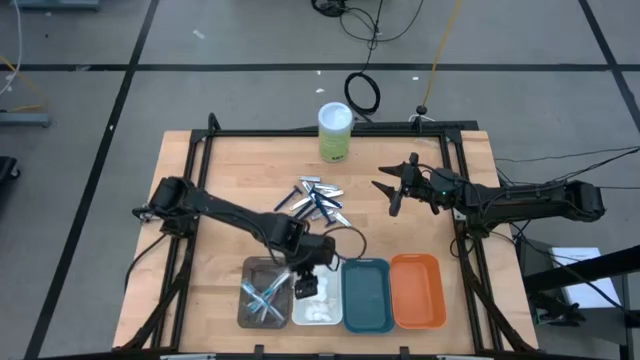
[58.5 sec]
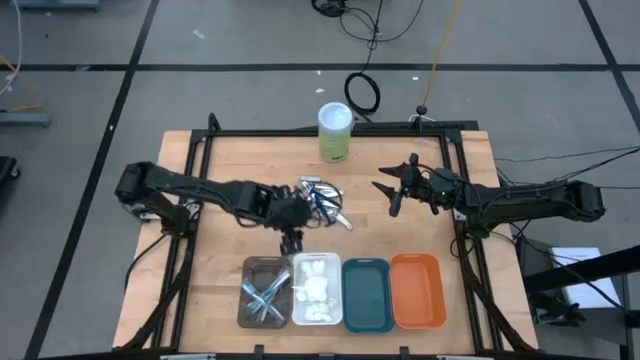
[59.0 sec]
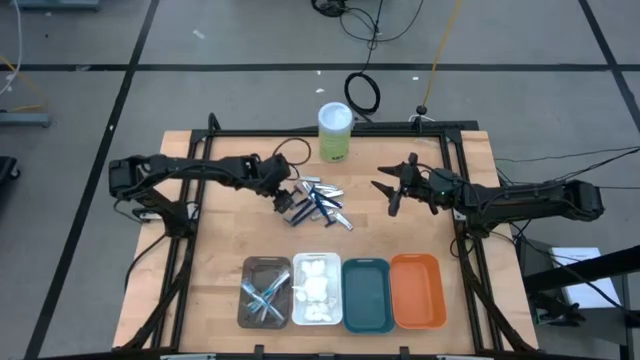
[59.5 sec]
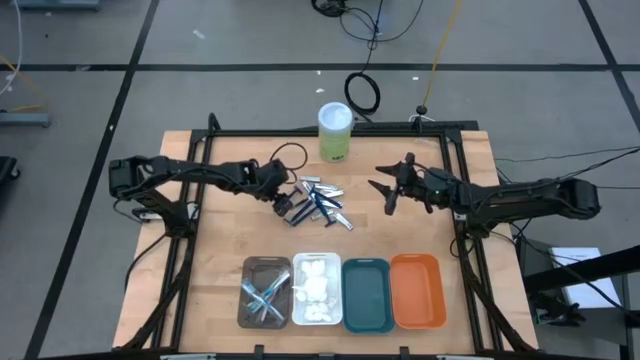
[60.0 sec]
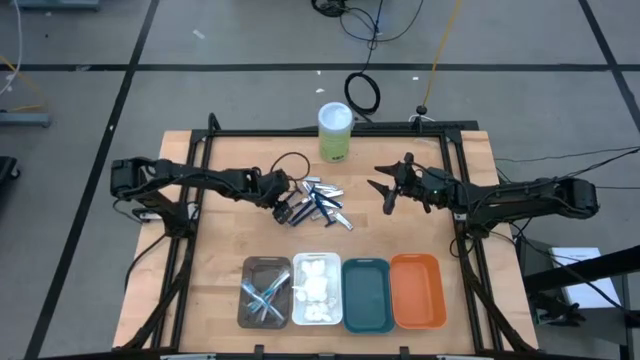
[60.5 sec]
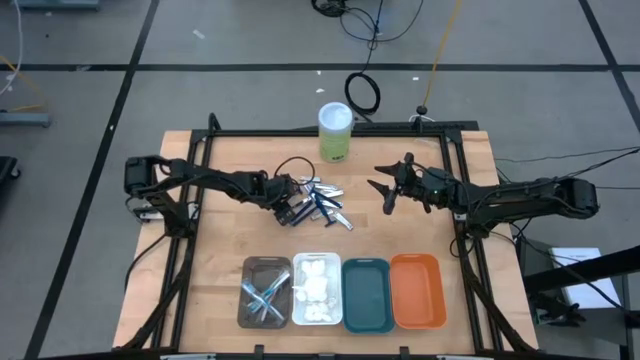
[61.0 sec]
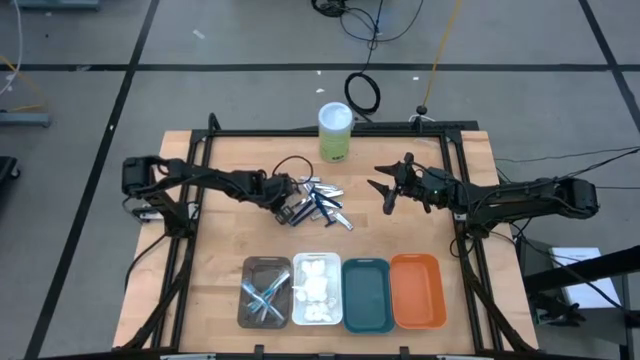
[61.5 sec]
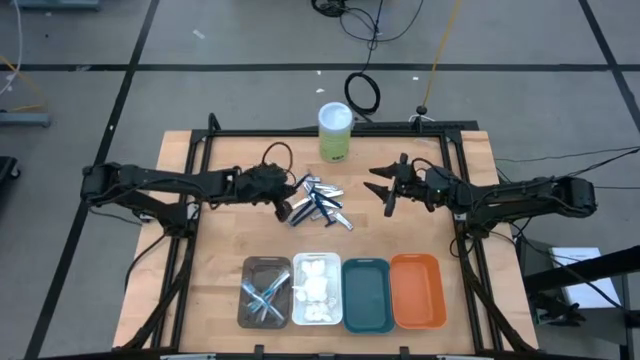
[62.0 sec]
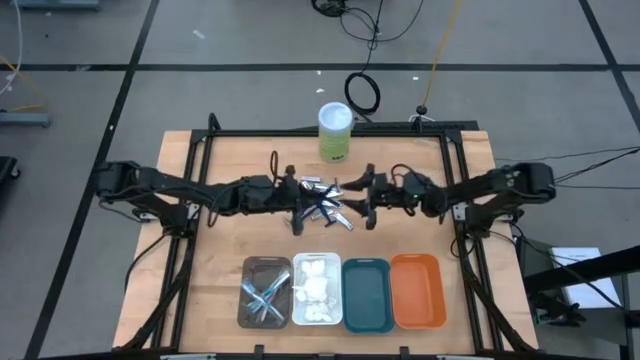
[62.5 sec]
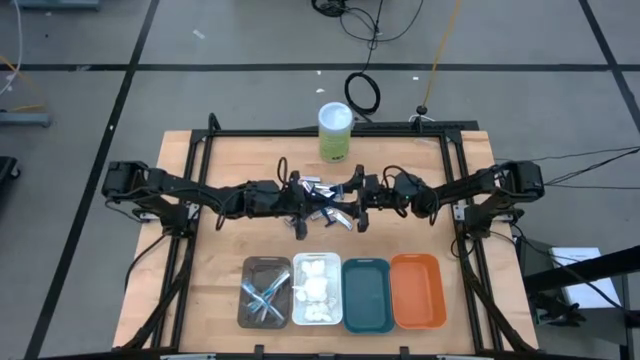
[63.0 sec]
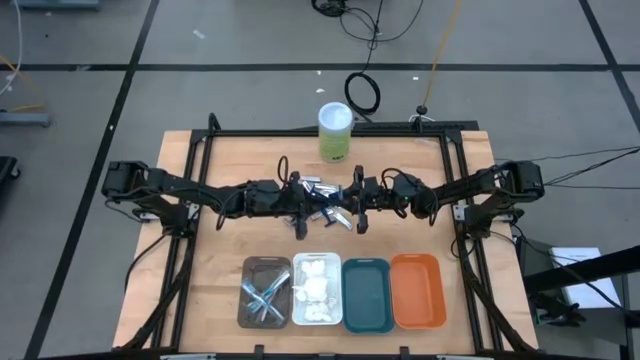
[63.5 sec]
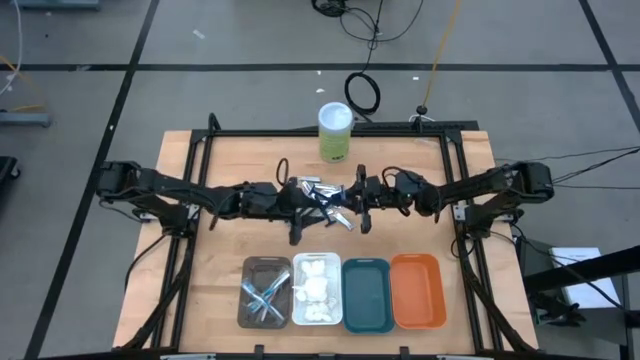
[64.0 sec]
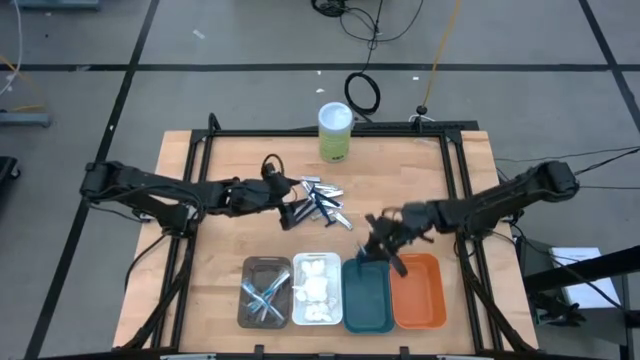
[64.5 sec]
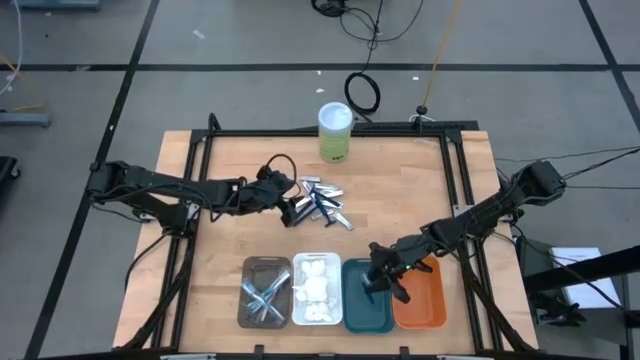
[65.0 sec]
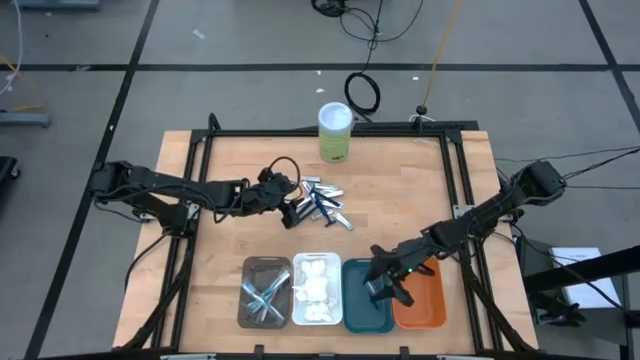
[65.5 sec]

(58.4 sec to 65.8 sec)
Task: Pick & Place Travel size toiletries
Put the blue razor into the blue bin

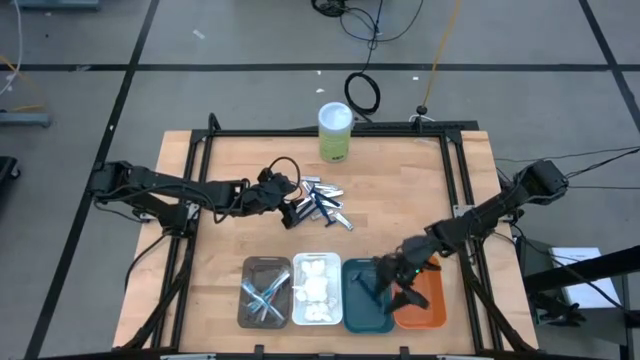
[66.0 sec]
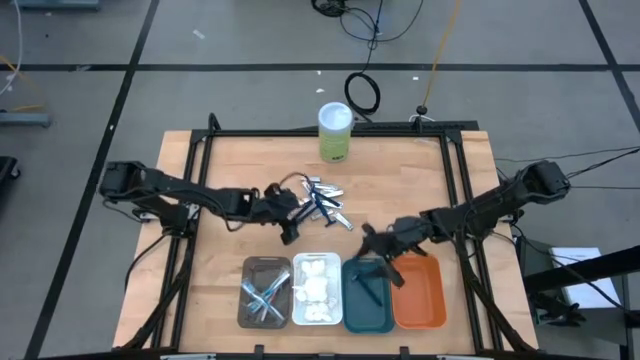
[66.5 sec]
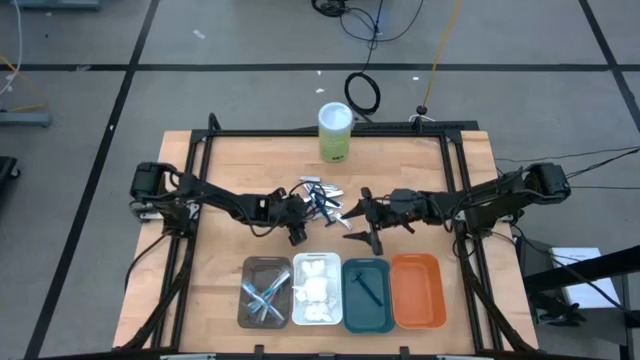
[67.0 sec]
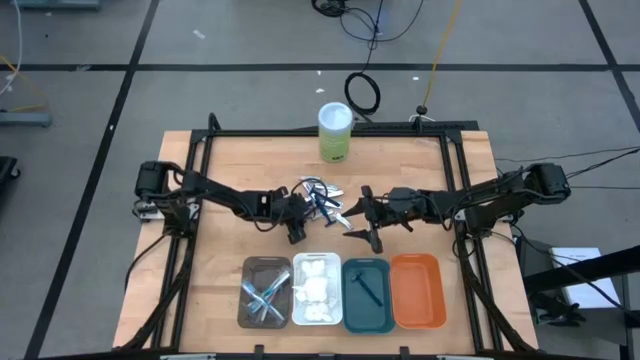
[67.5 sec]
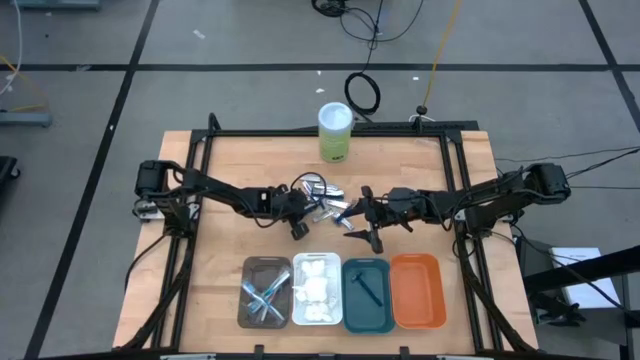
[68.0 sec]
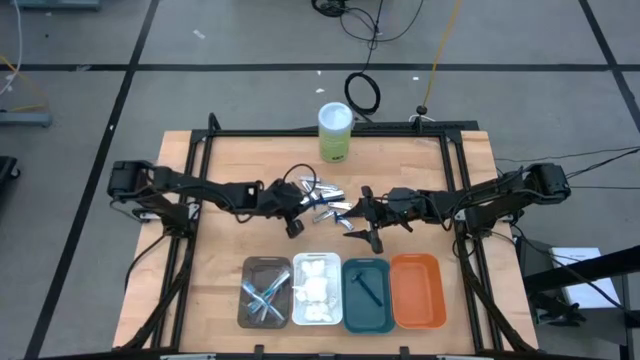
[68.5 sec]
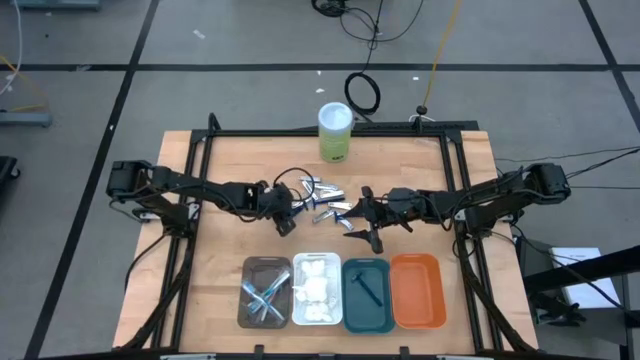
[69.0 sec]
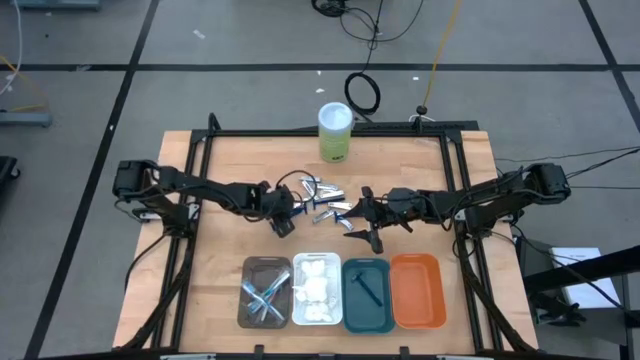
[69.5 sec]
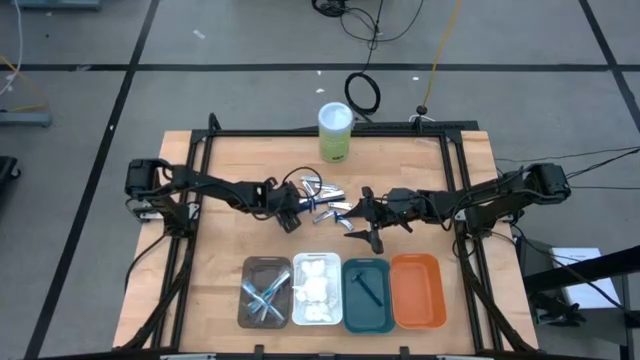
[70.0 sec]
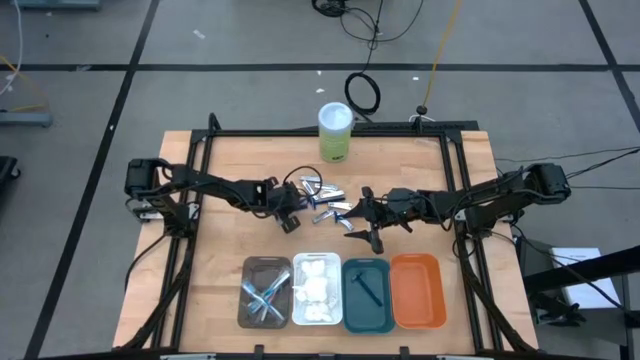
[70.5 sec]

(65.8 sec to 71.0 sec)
Put the blue razor into the blue bin

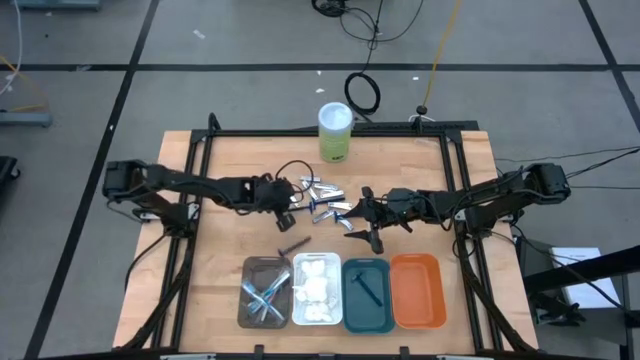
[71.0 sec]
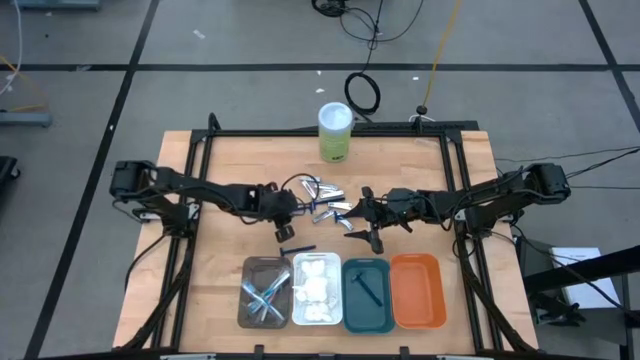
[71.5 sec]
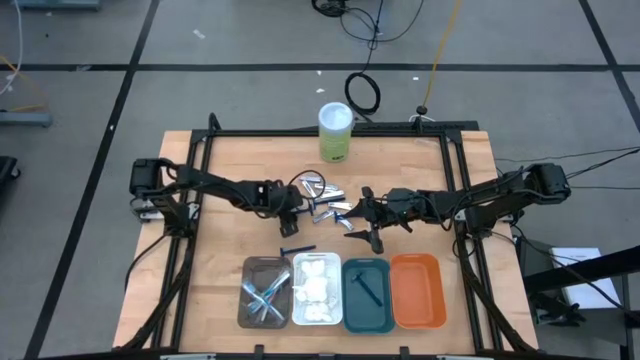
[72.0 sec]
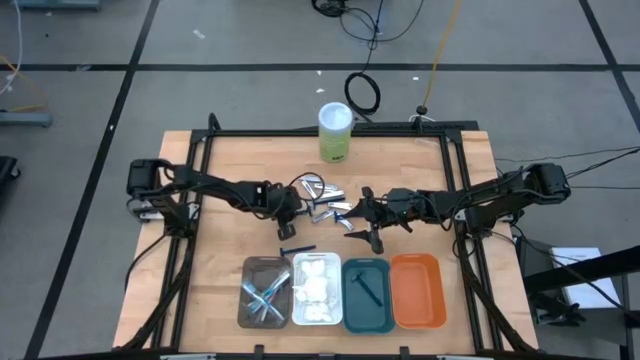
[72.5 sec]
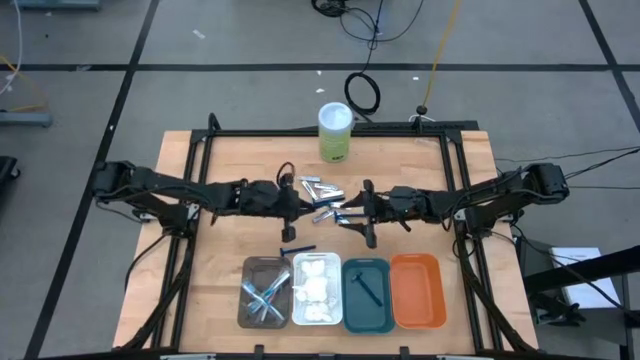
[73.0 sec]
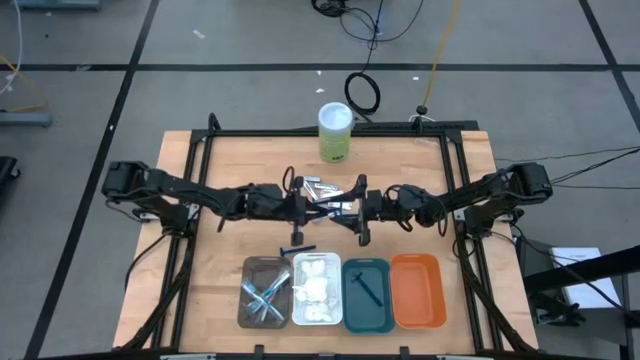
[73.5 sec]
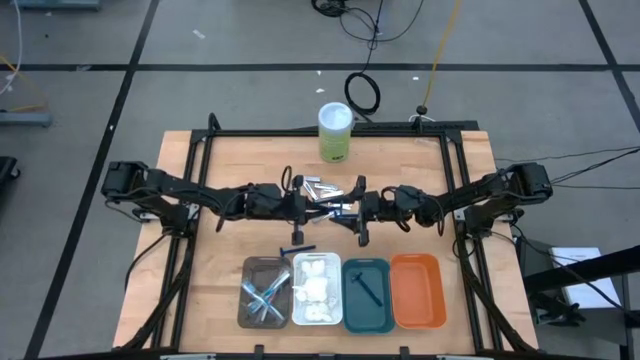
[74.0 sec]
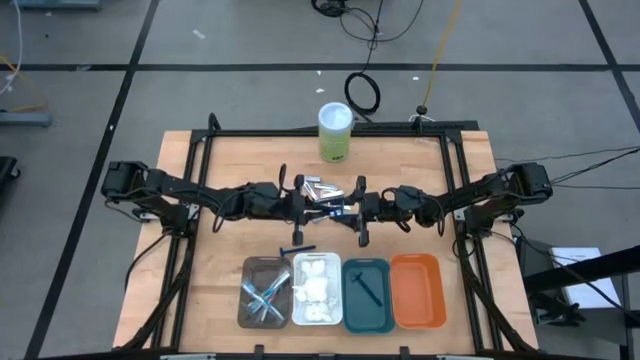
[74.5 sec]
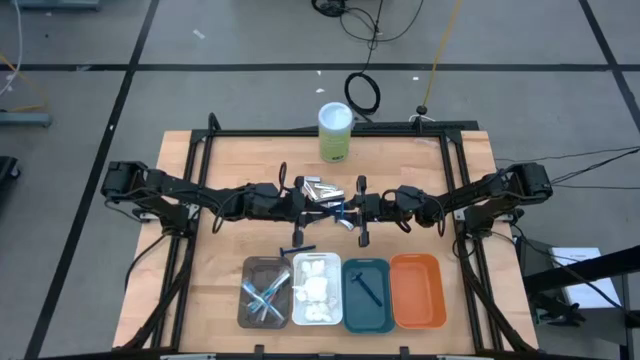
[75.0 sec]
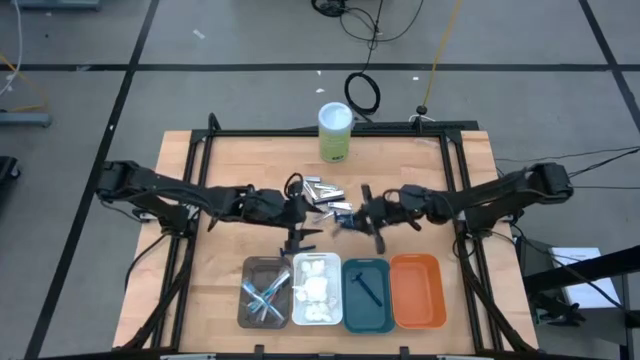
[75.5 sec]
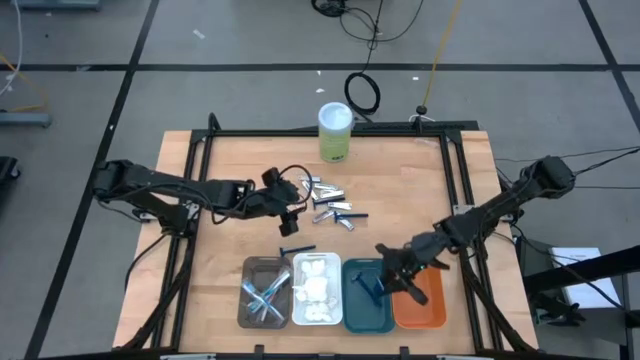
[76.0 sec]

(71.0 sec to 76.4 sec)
Put the blue razor into the blue bin

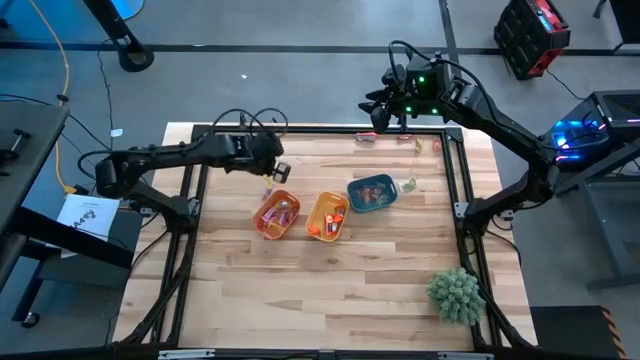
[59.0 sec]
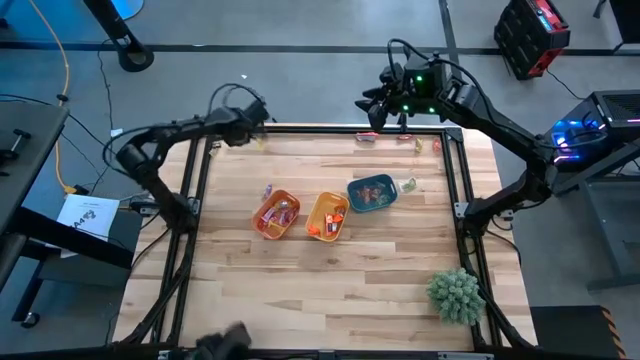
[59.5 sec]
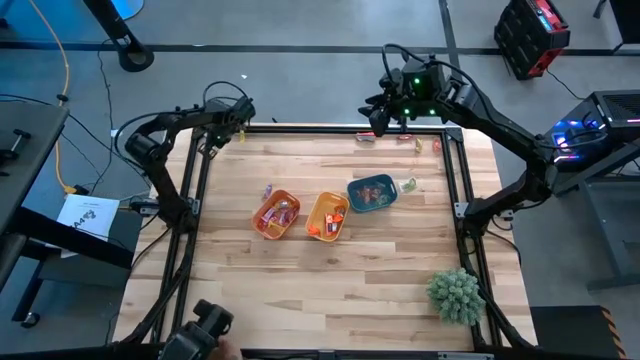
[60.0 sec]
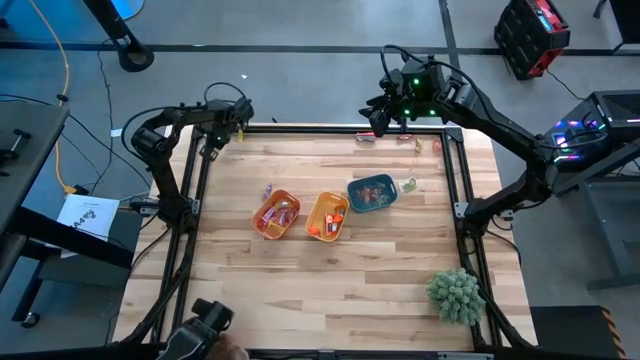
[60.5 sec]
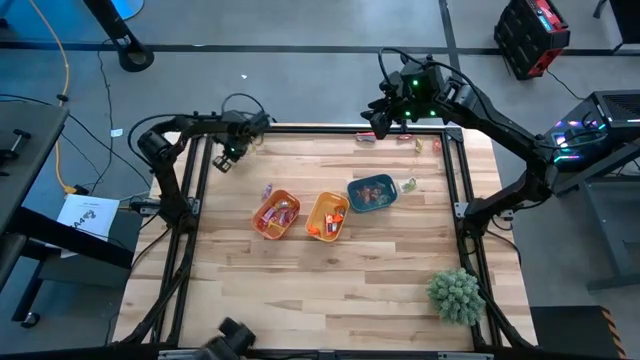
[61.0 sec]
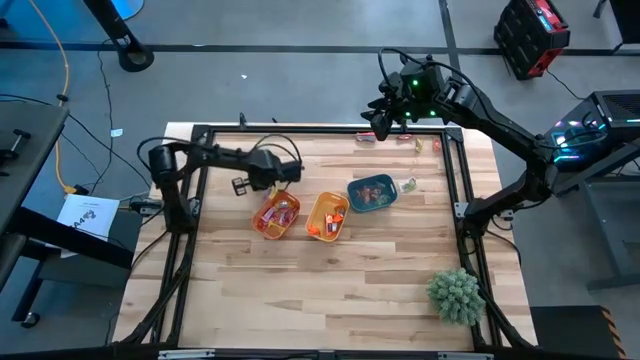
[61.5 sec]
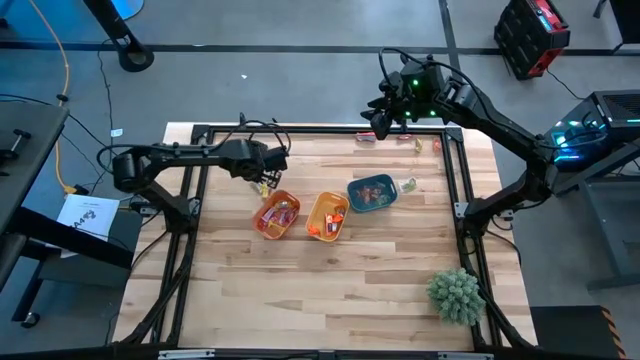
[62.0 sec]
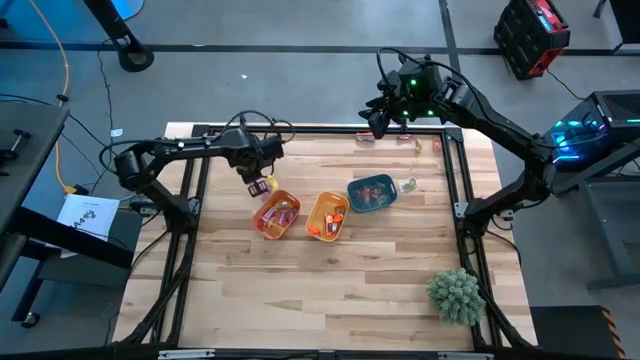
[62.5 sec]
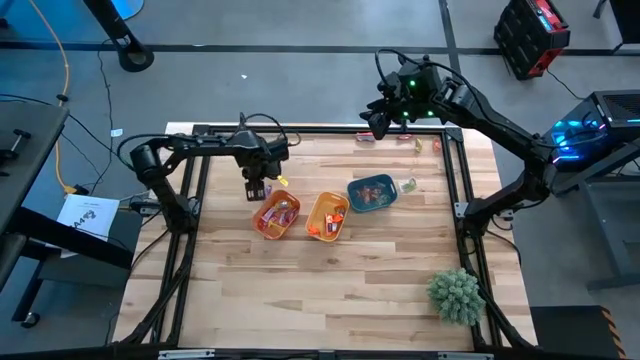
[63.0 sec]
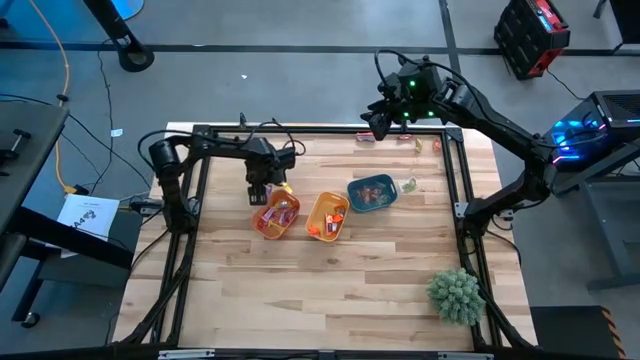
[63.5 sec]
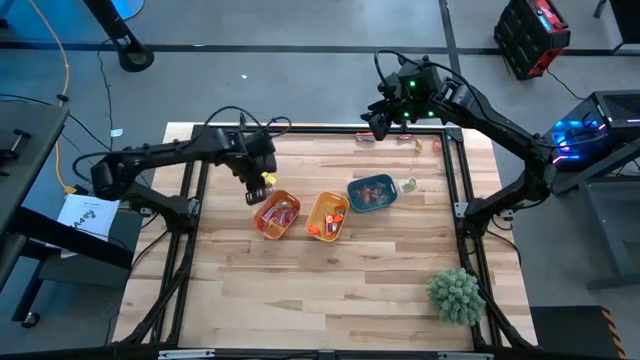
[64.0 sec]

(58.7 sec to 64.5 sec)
Task: Sort candy
Put the yellow candy into the orange bin
